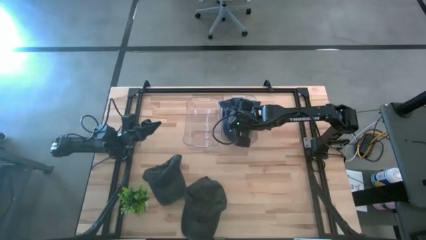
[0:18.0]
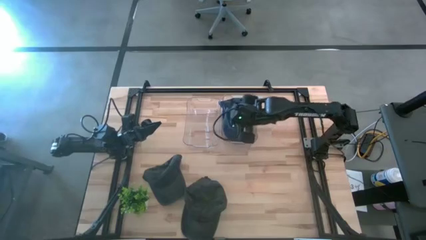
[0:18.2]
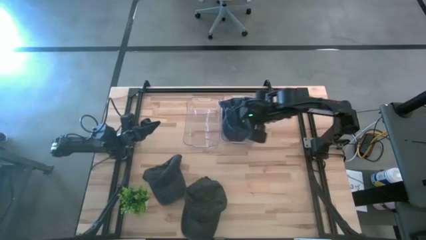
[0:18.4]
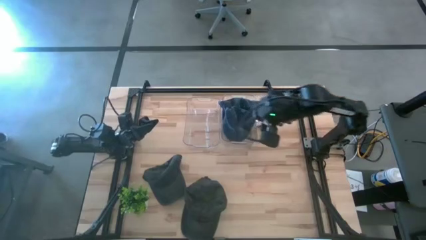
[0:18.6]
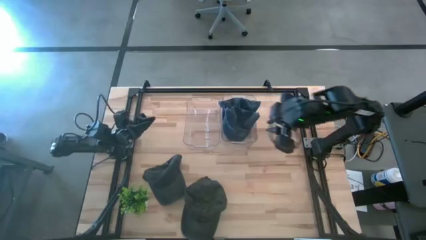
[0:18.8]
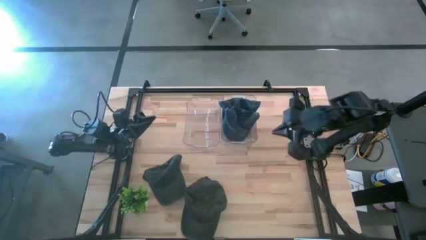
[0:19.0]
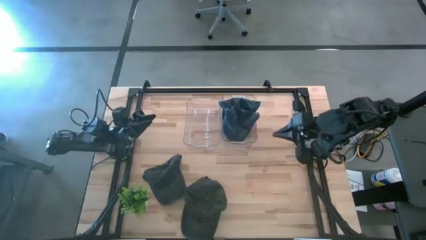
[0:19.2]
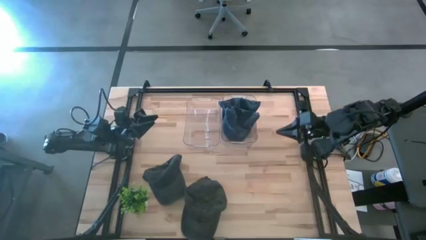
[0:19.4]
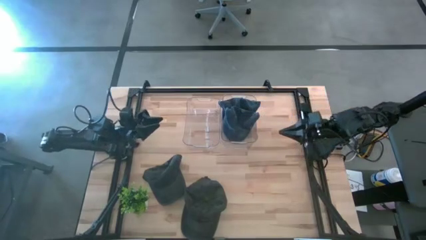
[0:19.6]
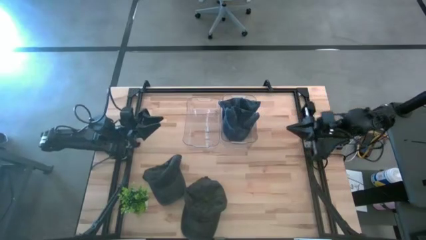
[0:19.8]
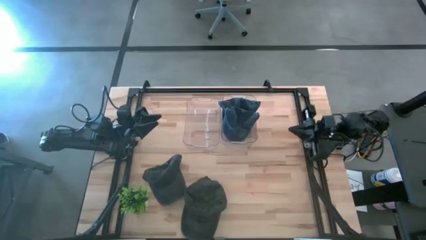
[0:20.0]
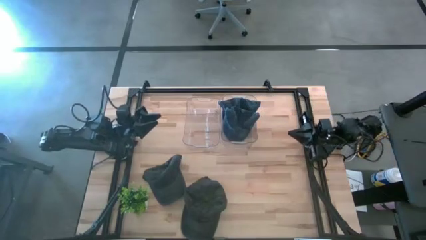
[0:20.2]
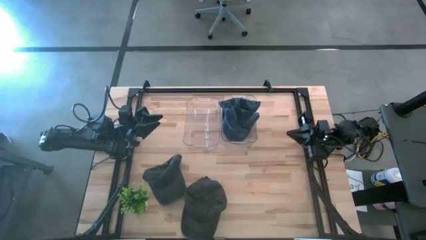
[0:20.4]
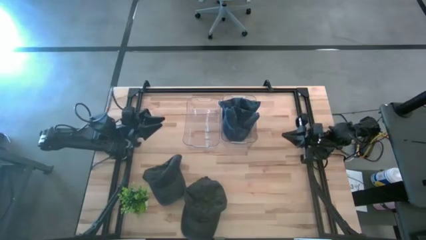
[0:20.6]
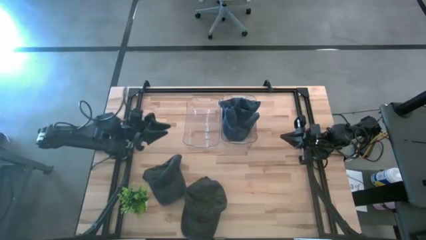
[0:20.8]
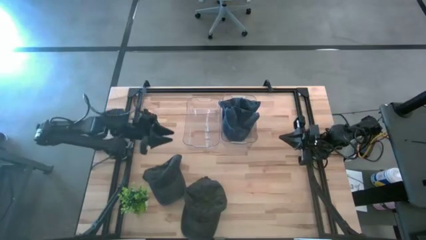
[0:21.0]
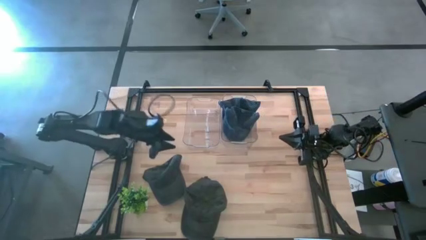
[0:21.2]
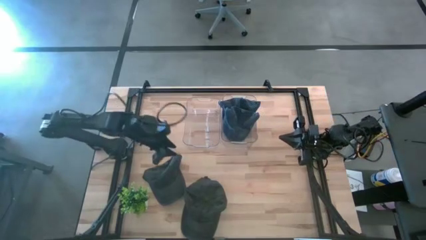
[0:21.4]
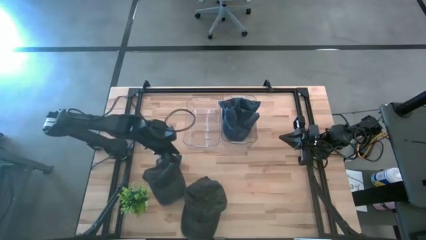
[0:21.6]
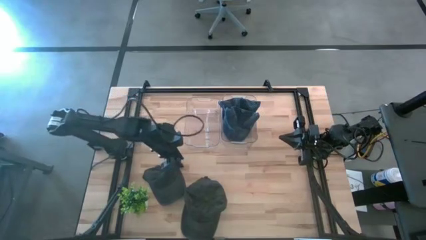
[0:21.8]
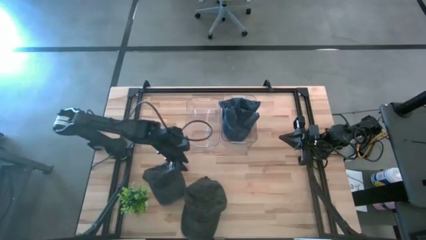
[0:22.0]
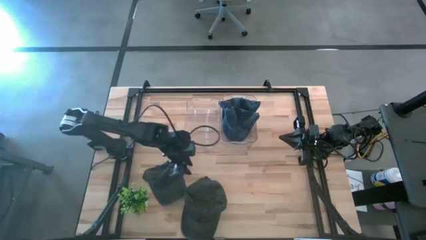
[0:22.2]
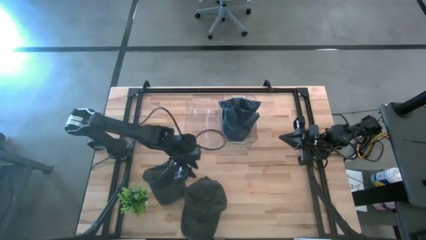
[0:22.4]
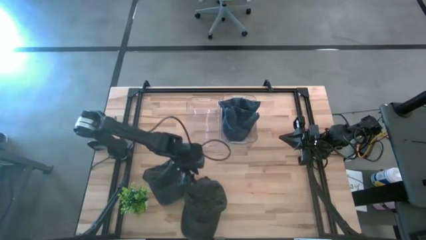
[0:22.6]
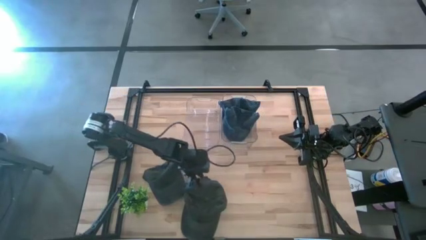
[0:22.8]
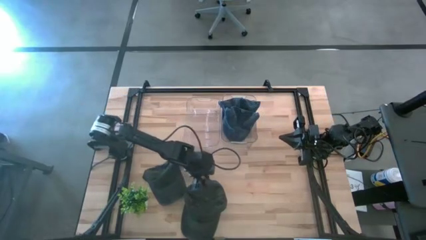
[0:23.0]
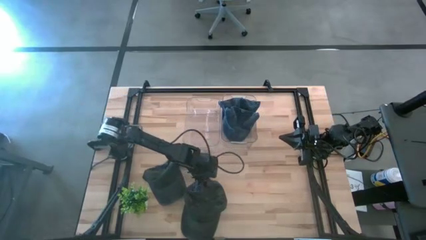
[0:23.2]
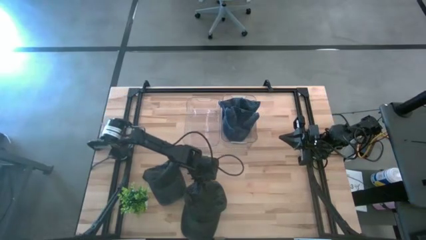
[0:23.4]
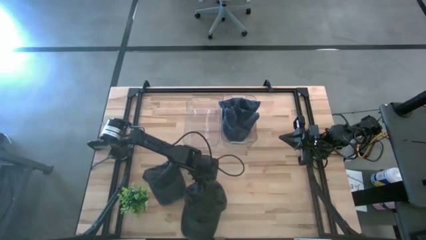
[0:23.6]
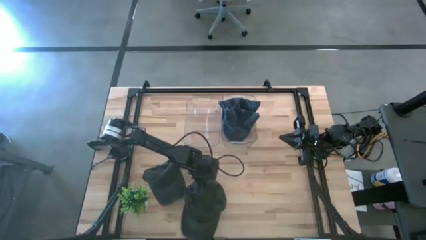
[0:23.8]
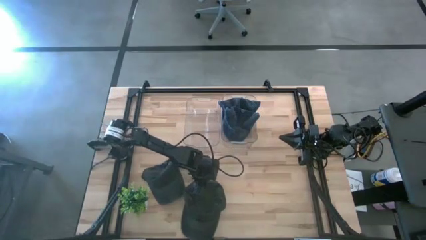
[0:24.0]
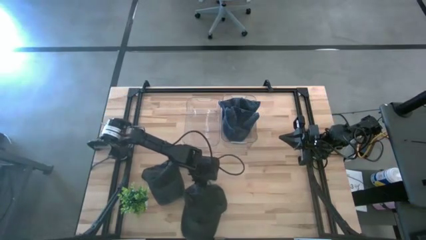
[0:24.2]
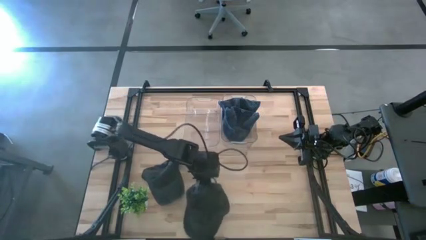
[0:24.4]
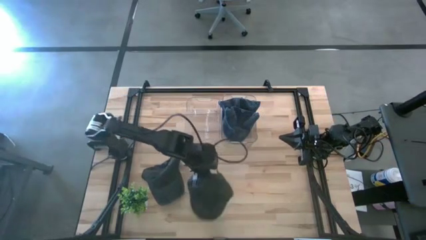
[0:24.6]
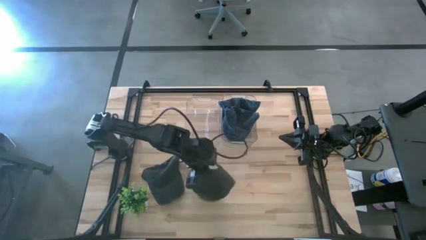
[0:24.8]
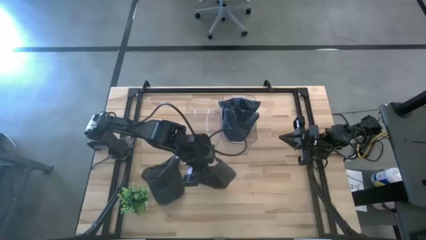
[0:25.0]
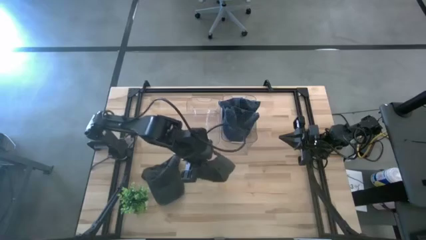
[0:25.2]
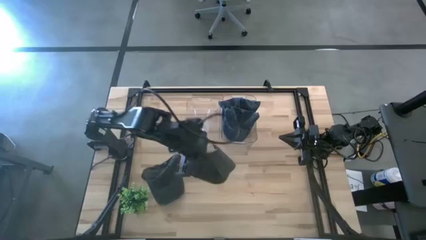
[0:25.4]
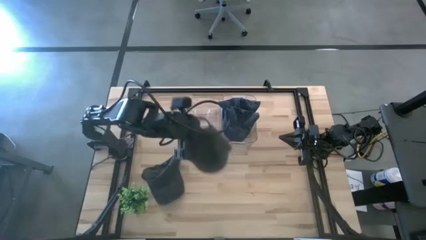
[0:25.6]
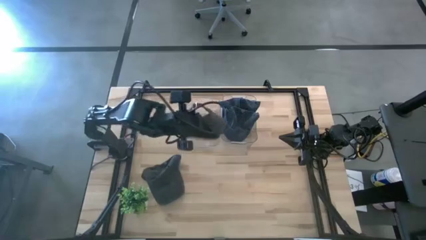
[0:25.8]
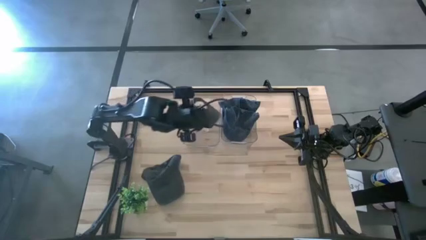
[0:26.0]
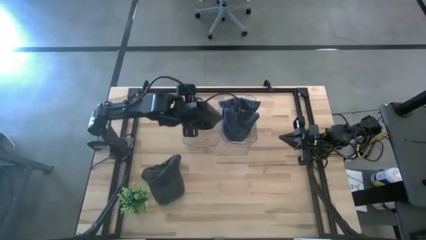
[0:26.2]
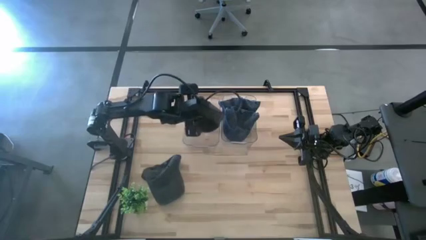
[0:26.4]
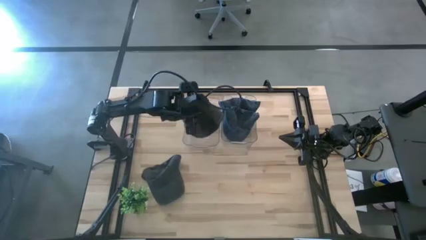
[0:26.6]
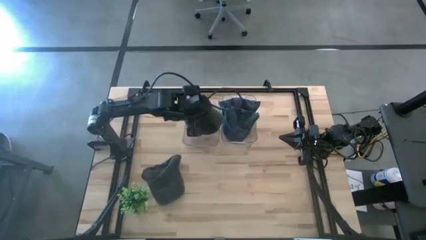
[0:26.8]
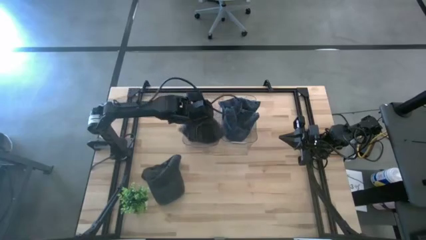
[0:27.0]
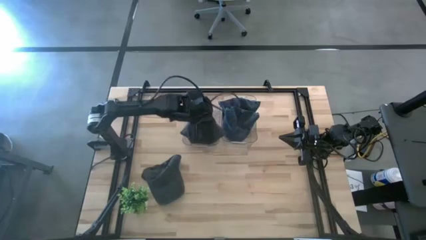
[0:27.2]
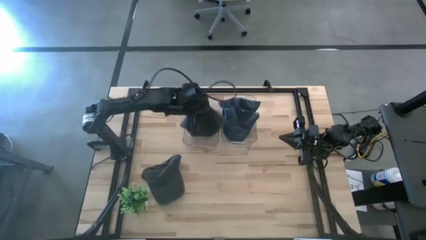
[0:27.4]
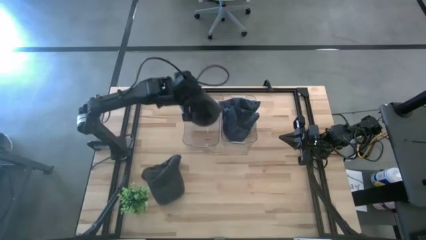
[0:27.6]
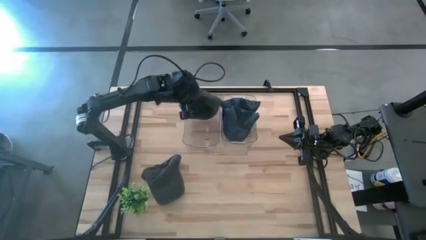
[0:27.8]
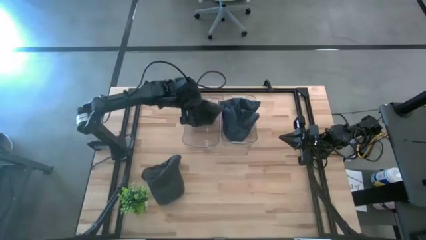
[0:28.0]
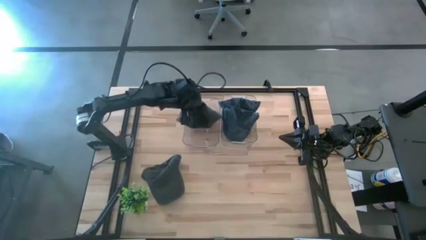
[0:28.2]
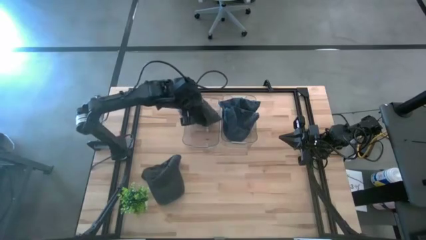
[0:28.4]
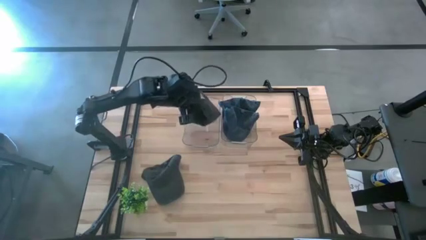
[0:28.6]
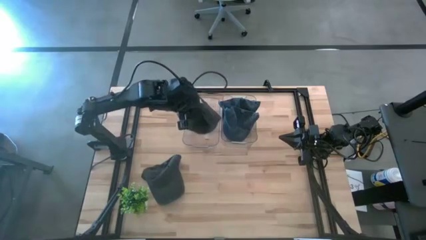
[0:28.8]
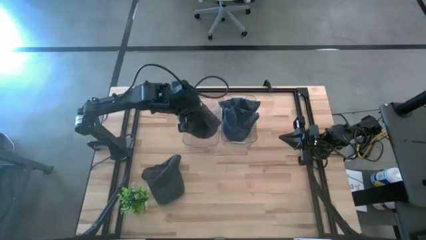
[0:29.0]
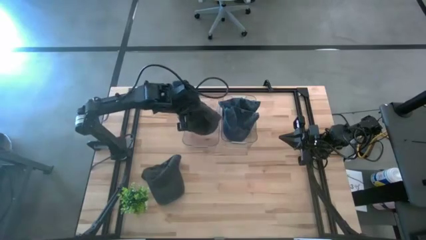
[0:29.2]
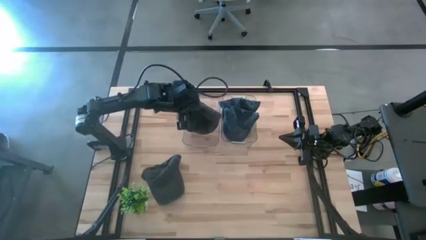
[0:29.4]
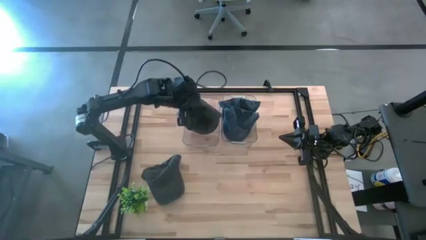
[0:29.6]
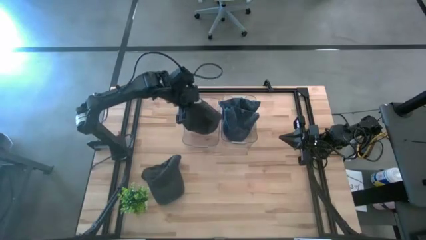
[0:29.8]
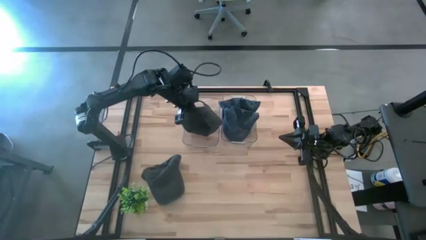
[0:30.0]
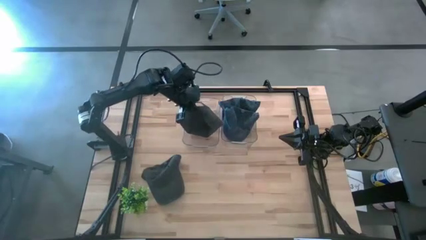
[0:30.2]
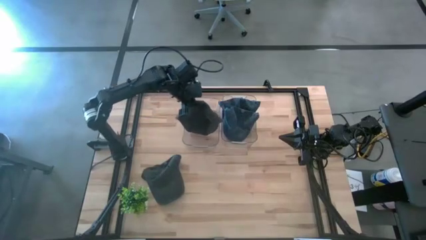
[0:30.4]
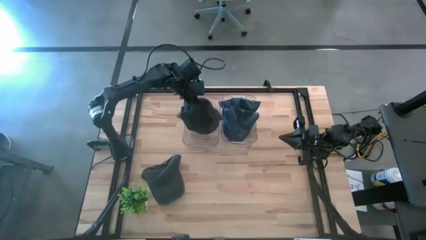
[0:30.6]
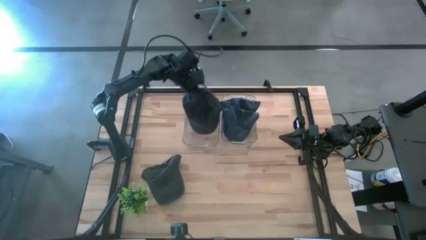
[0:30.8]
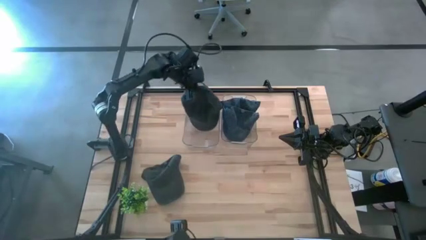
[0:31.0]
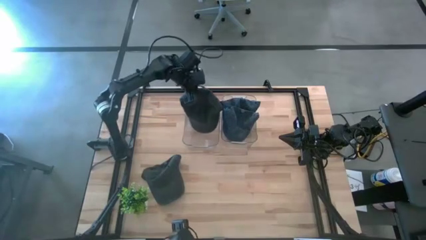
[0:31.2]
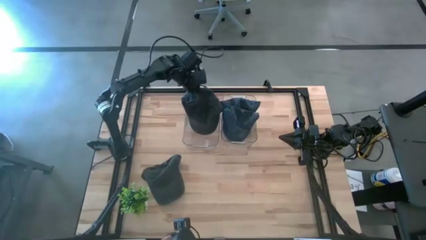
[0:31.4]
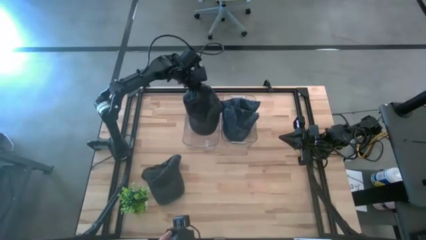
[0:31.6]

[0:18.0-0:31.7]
Task: Pick & Place hat
Put the bottom gray cap into the left transparent bin
